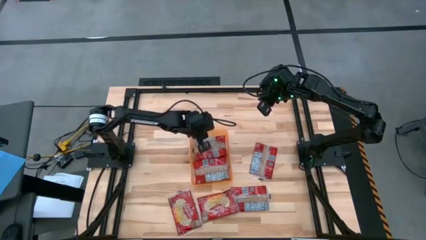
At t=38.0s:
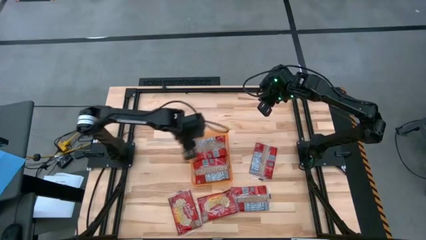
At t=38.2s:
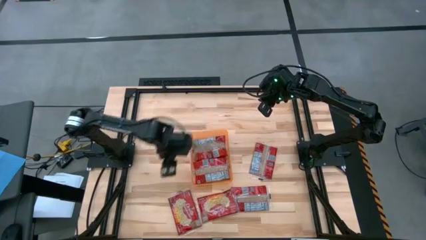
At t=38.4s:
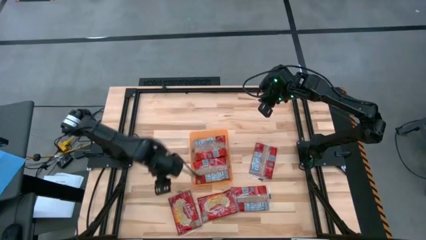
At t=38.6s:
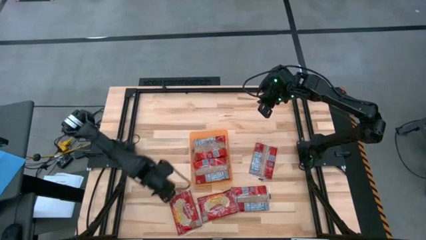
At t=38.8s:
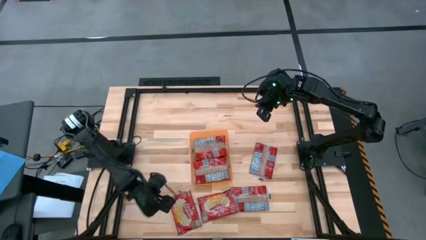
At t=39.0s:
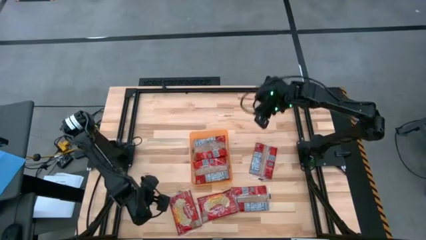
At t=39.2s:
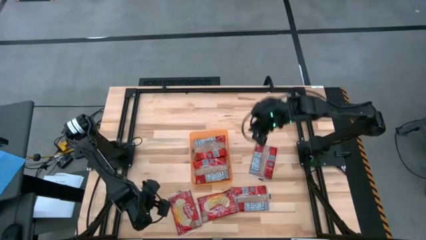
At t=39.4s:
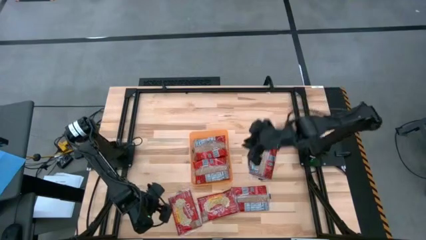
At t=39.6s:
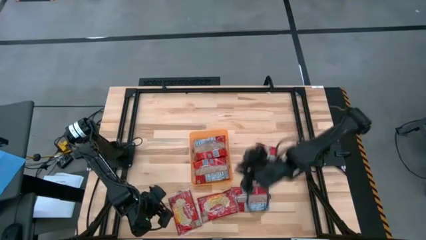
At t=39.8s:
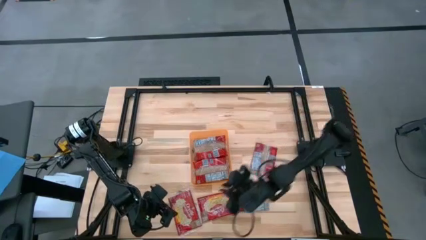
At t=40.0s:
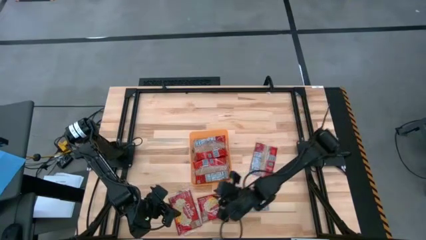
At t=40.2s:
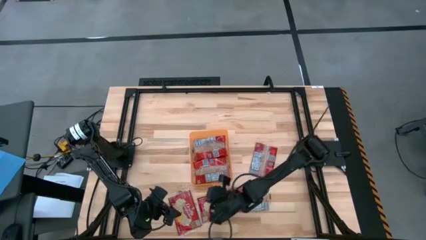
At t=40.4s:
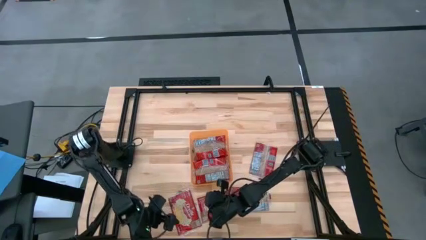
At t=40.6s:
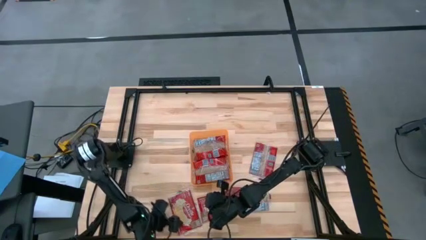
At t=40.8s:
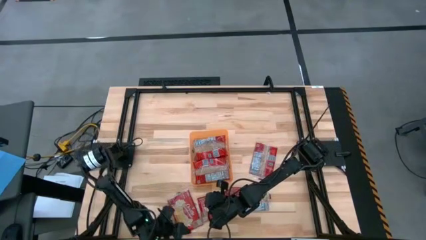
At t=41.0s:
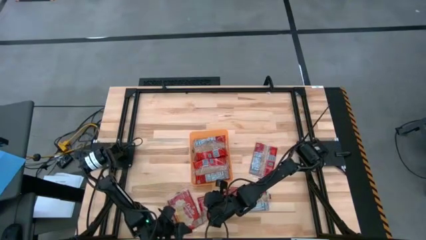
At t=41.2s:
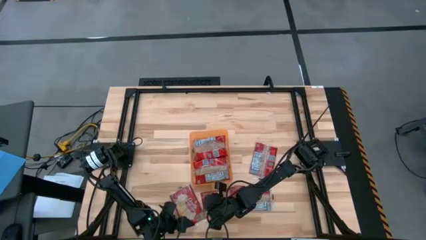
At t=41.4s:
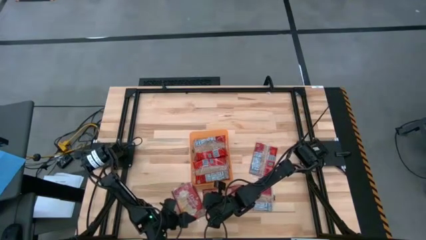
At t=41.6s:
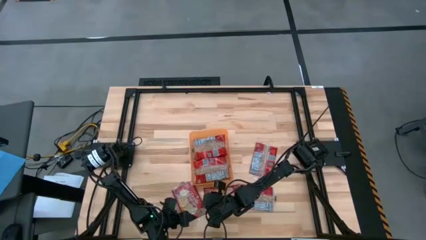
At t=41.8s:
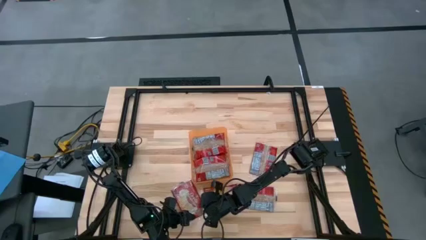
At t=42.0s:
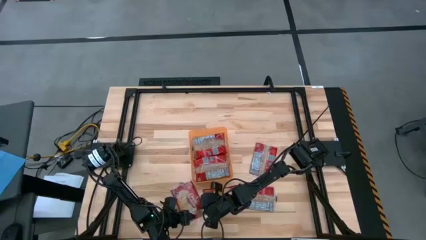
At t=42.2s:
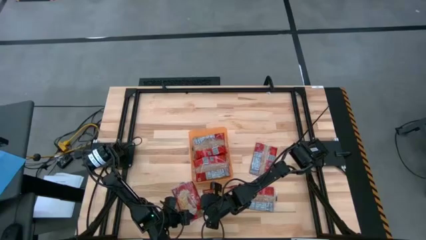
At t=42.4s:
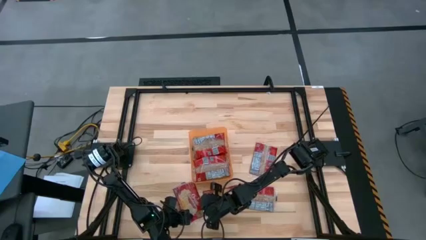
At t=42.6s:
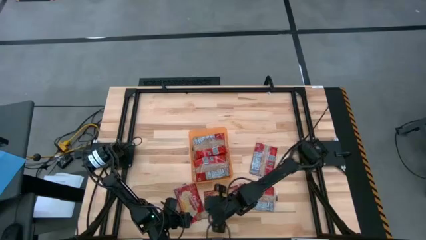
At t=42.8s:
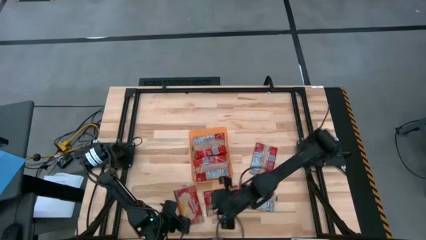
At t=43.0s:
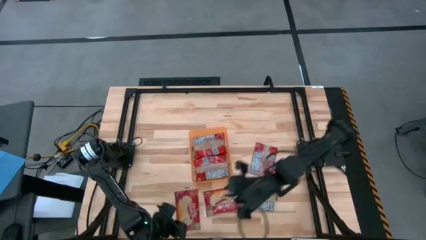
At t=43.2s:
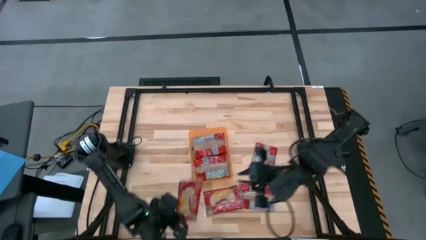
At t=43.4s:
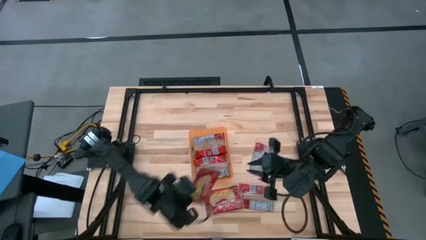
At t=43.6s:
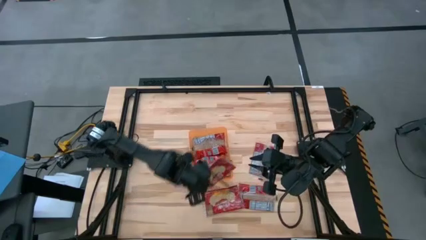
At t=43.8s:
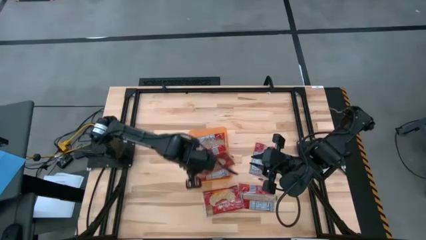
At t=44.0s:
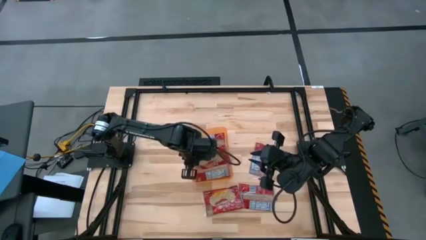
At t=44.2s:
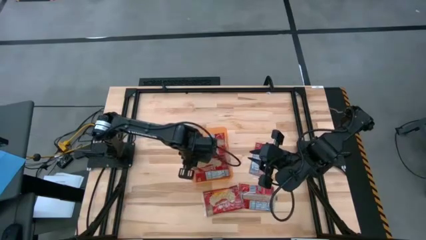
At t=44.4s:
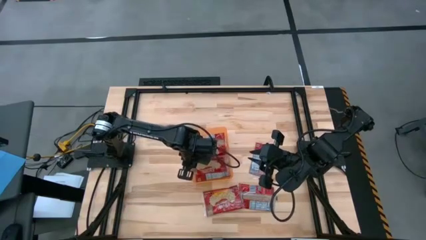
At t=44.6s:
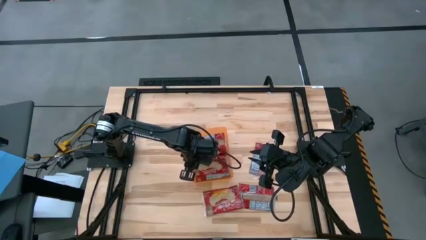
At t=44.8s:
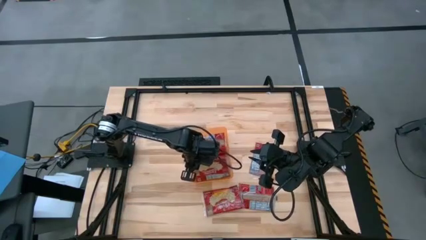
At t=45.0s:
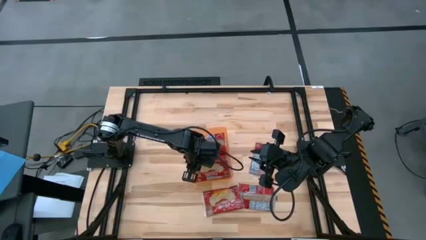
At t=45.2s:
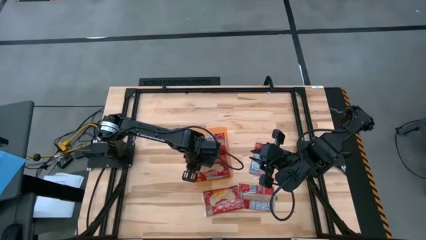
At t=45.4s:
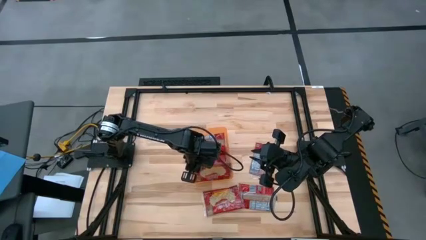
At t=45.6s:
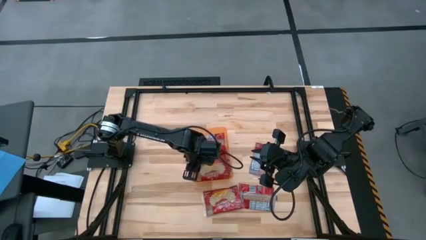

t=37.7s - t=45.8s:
Task: Sort popcorn bags into baskets
Put the red popcorn bag into the orange bin

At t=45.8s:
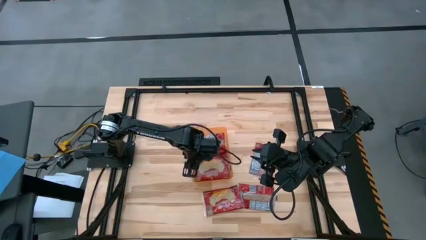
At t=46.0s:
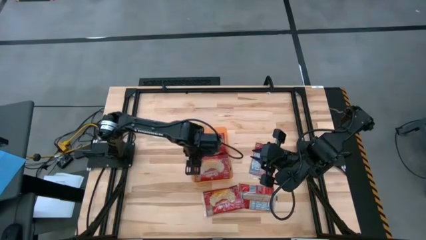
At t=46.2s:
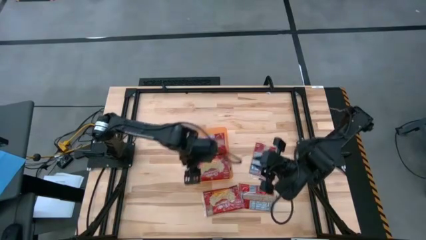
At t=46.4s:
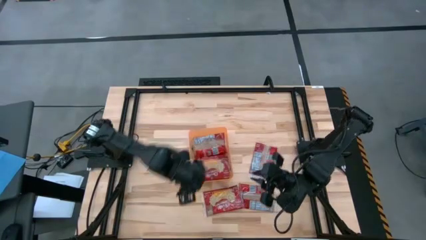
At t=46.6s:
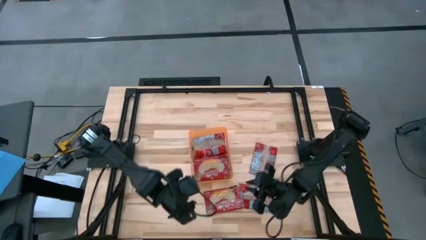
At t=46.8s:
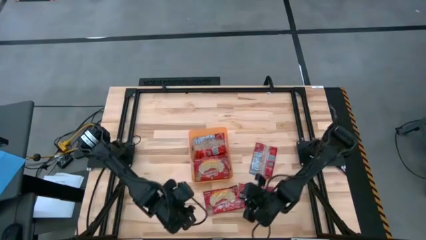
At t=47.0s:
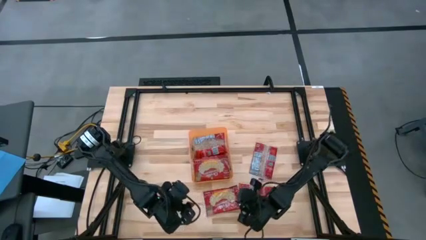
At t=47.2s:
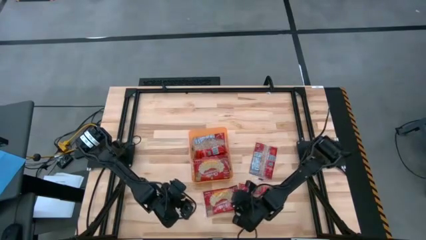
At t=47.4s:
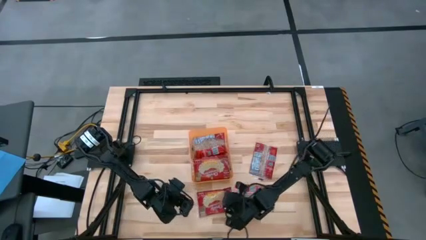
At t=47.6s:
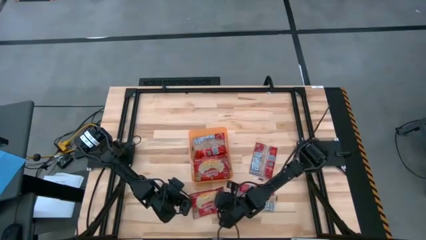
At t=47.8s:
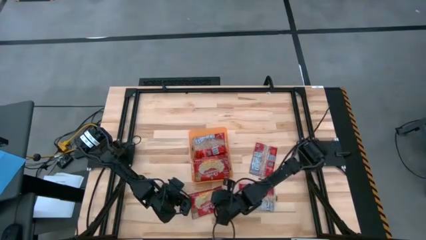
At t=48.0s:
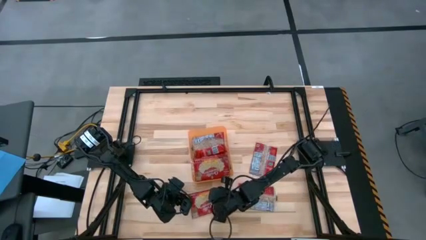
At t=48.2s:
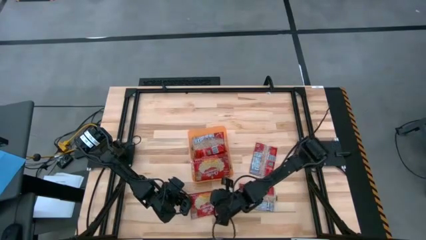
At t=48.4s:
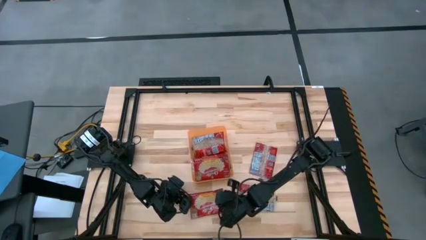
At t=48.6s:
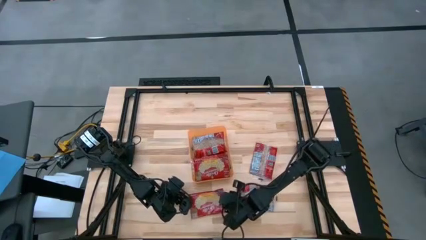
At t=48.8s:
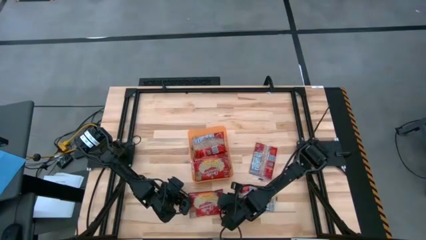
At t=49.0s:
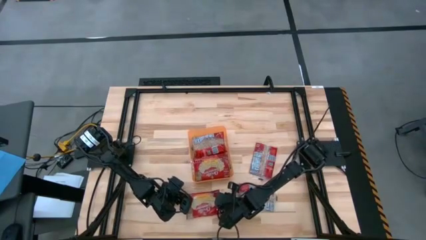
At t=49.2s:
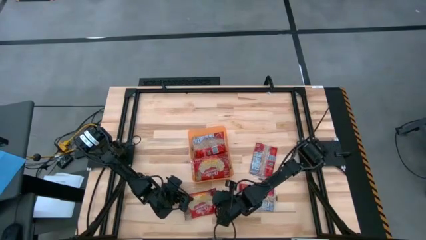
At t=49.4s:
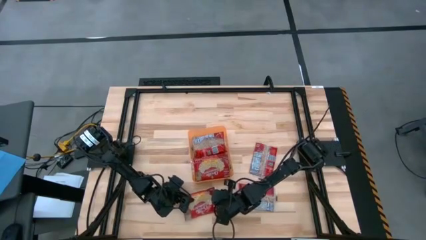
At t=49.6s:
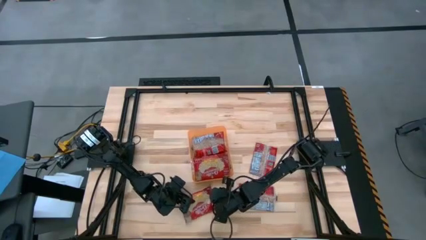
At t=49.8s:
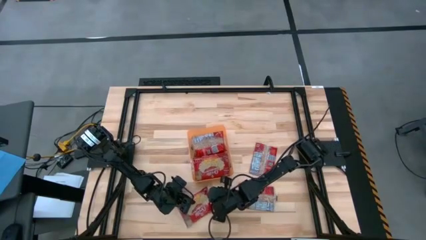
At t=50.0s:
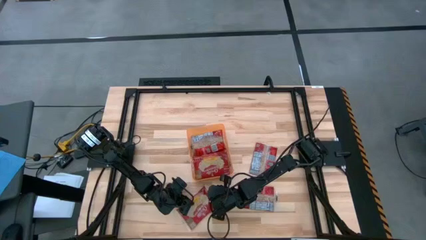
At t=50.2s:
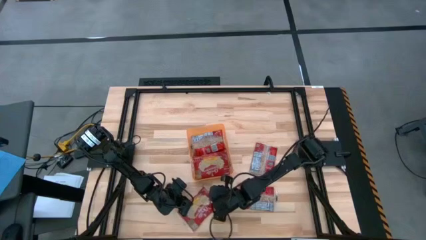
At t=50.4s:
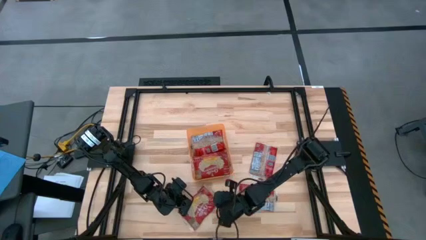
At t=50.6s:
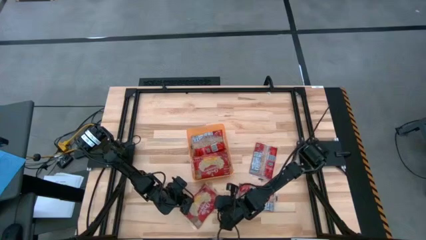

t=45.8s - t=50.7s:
Put the red popcorn bag into the orange bin

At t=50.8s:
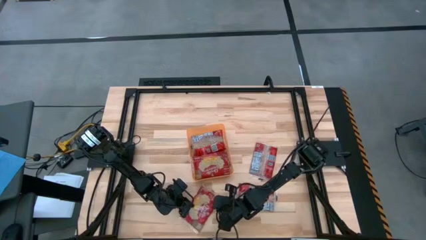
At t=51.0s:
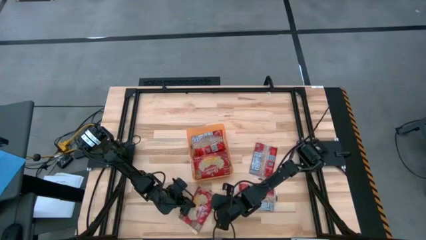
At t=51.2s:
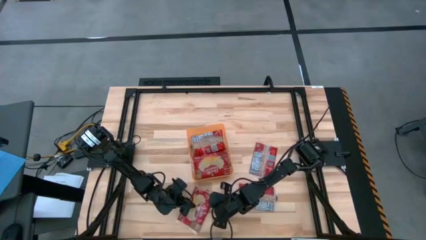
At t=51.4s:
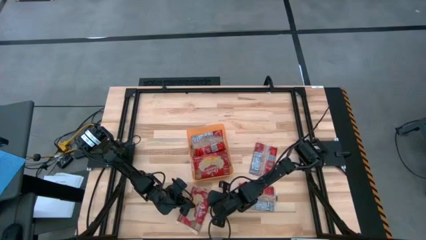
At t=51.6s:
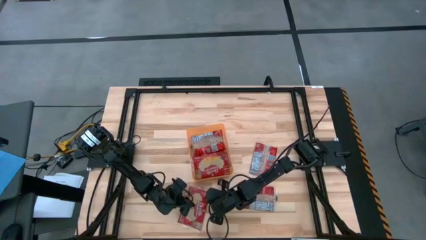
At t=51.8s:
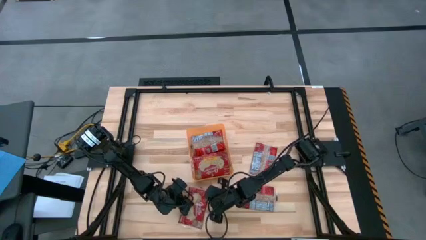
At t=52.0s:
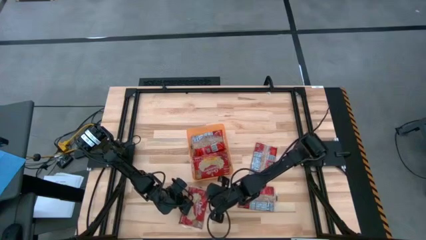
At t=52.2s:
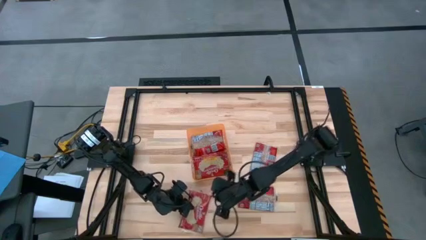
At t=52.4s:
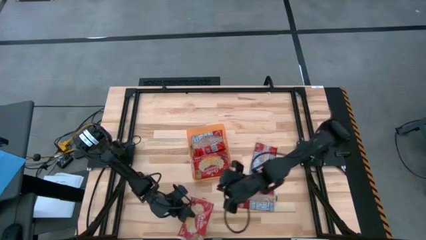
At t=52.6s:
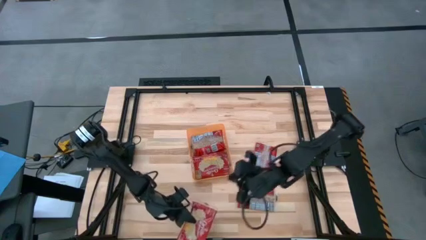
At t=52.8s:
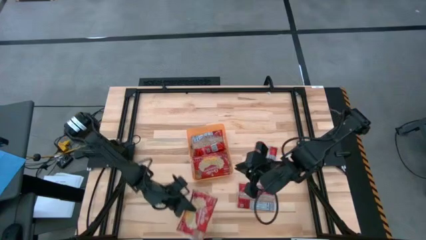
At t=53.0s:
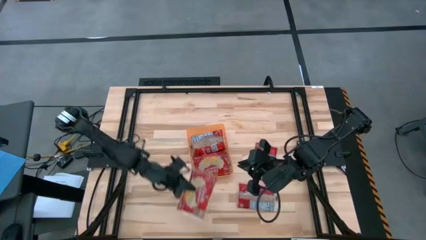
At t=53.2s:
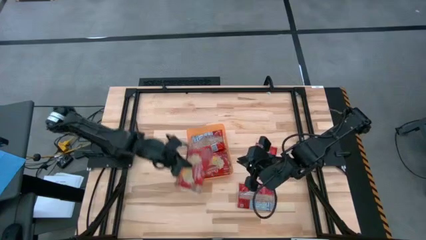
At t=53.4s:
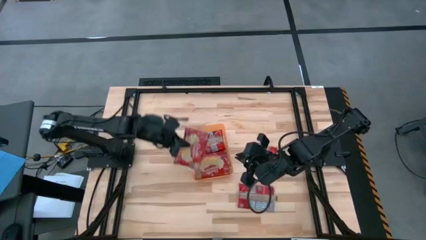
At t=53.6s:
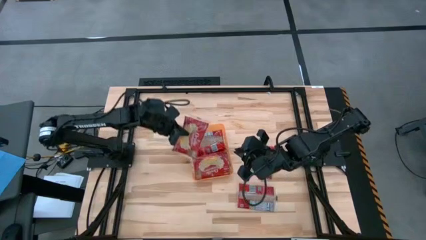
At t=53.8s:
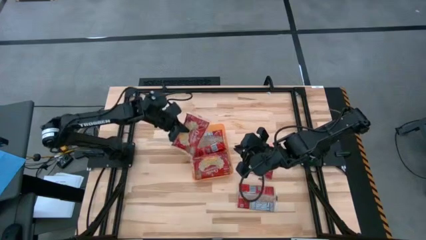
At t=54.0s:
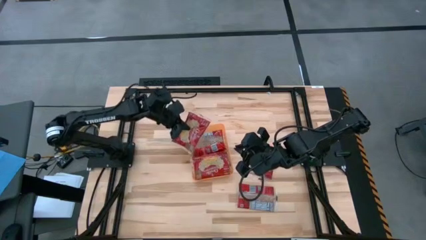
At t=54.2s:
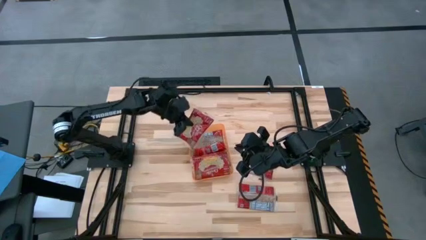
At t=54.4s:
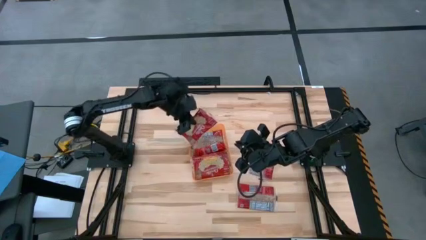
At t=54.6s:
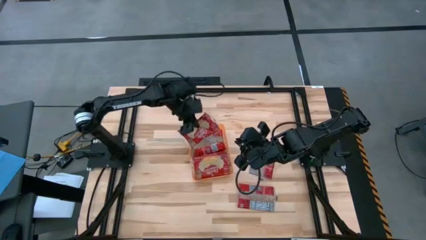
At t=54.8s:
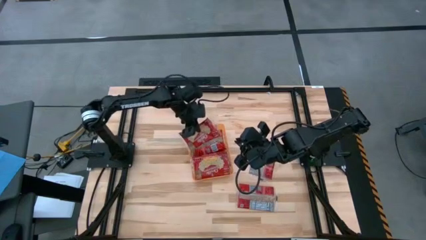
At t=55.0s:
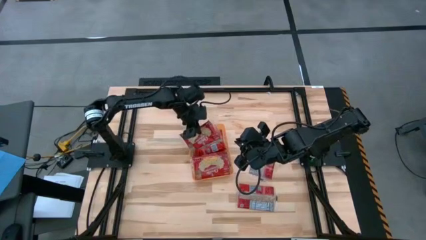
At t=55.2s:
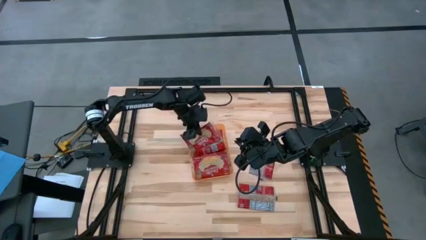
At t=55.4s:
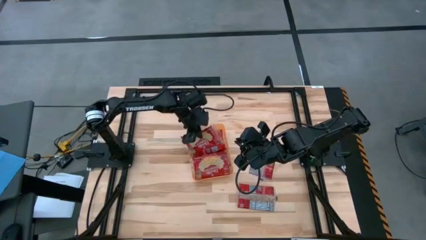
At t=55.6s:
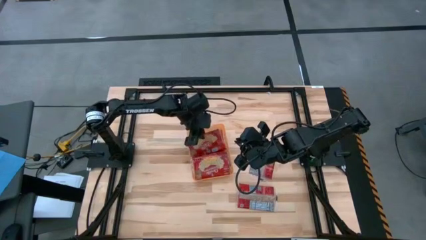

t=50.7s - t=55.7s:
Put the red popcorn bag into the orange bin
